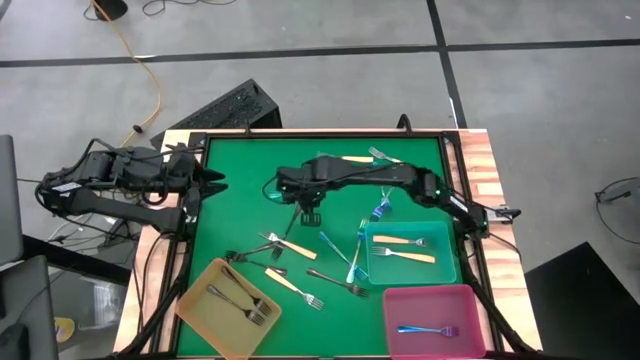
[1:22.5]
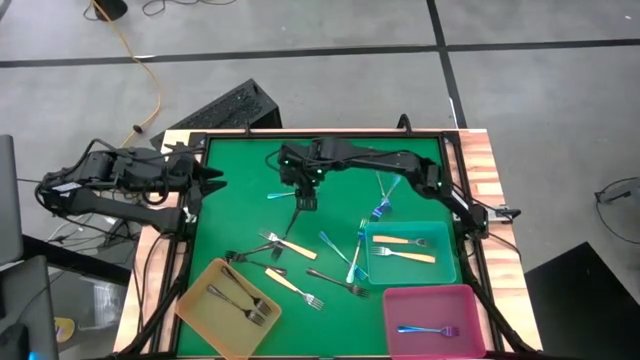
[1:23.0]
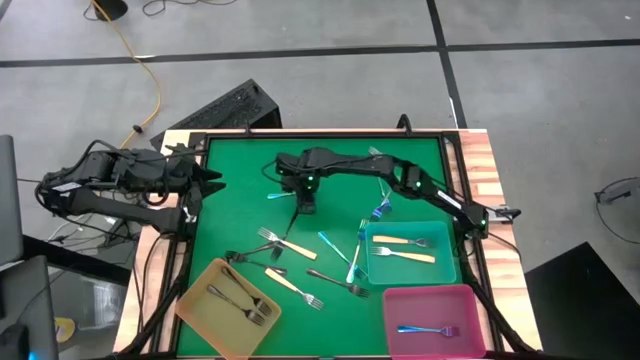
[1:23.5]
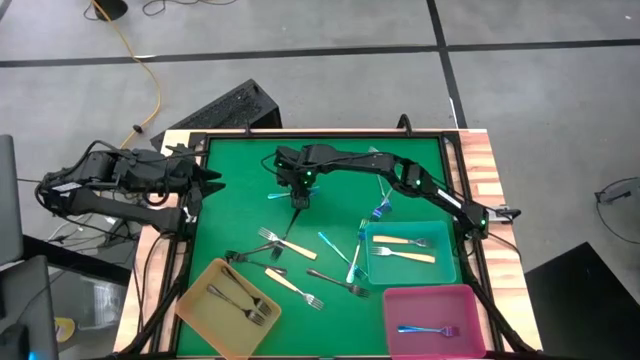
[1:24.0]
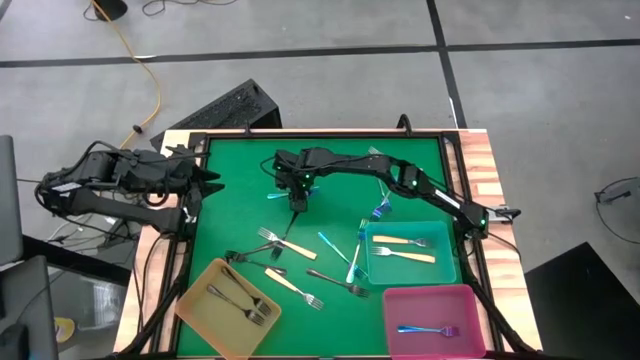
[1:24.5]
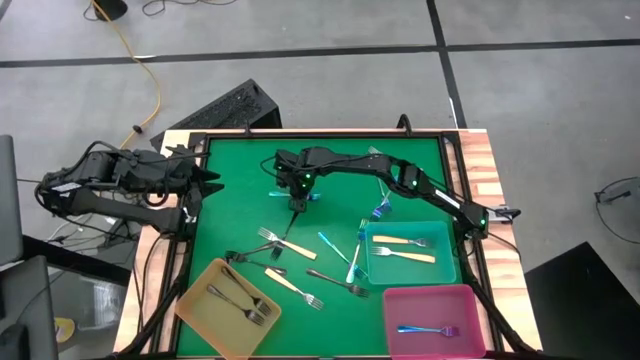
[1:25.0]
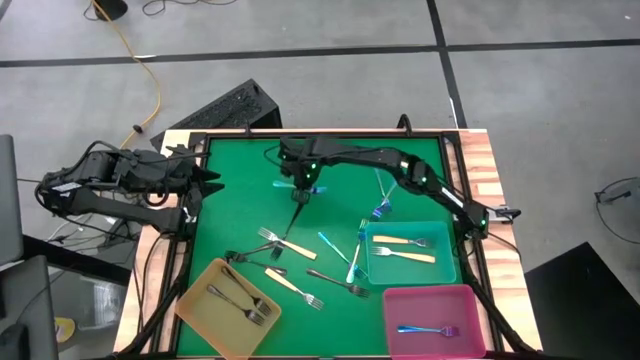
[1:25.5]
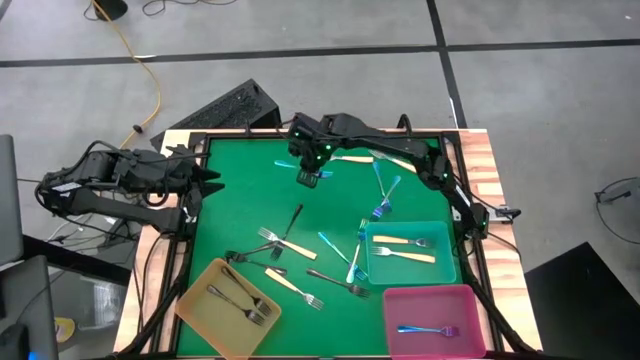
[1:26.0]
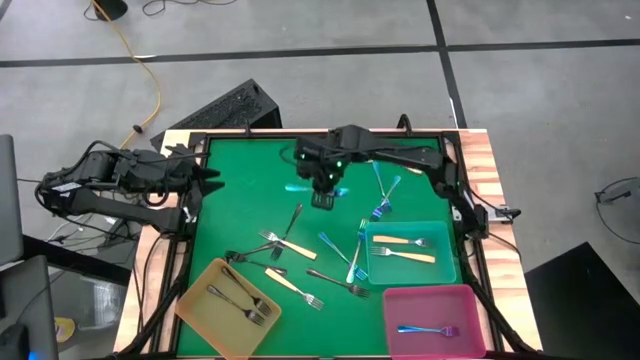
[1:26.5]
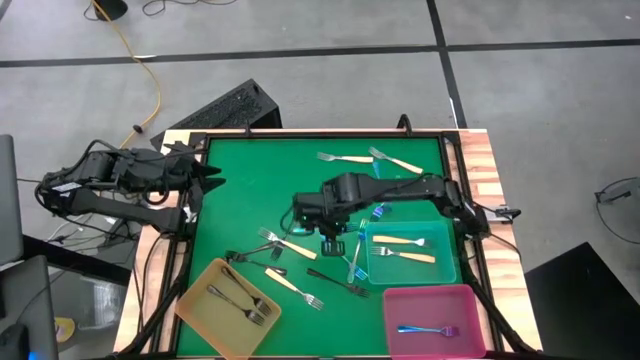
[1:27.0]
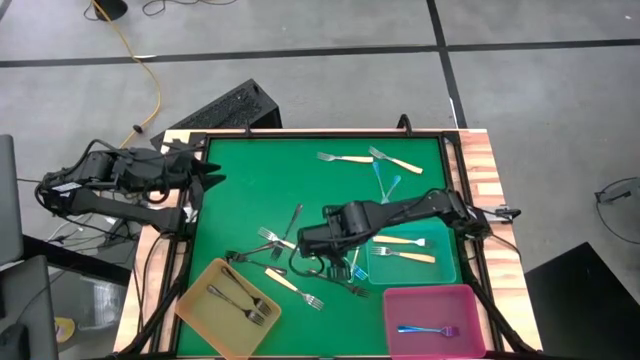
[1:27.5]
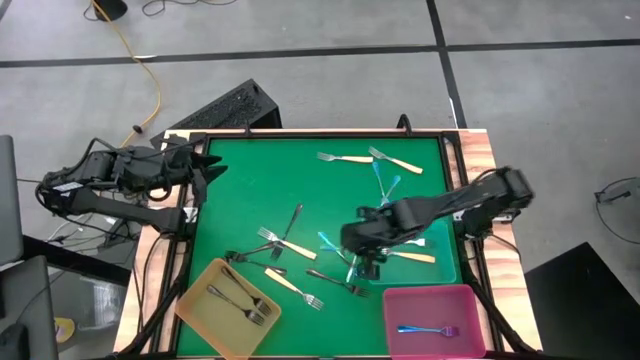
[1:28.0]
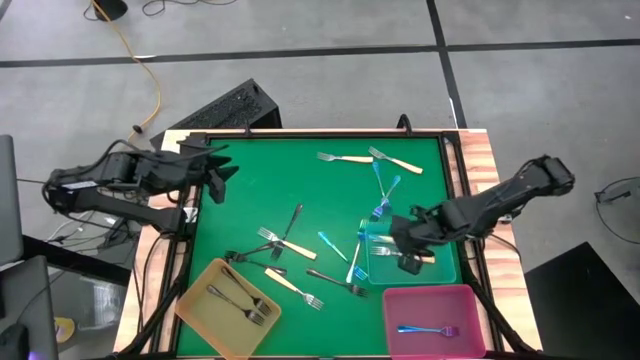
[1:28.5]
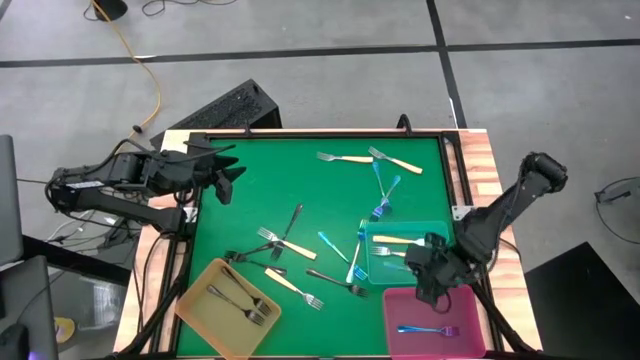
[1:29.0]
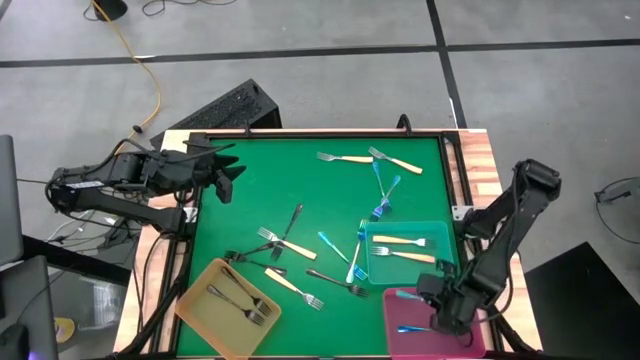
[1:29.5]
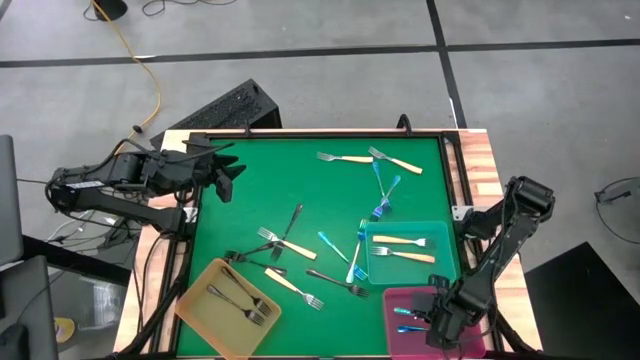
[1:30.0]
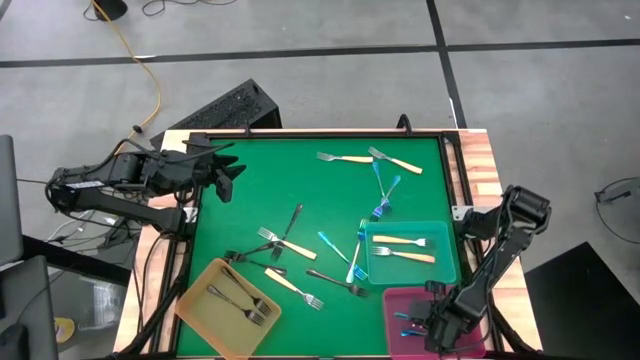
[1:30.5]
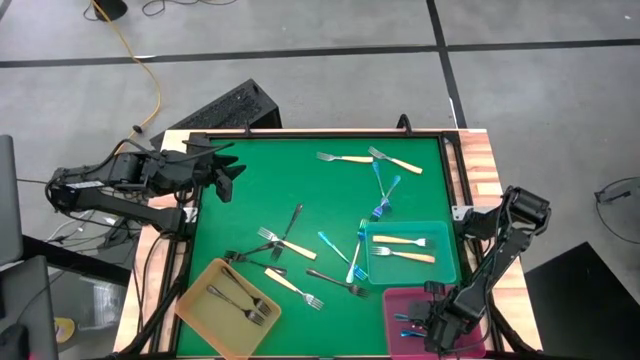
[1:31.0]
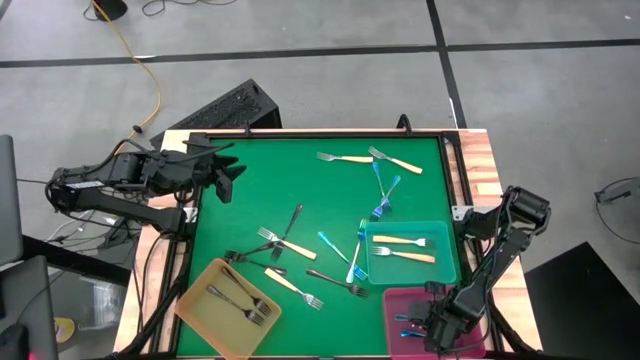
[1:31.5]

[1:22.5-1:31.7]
Task: Sort silverware by color (type)
Put the purple fork into the pink bin

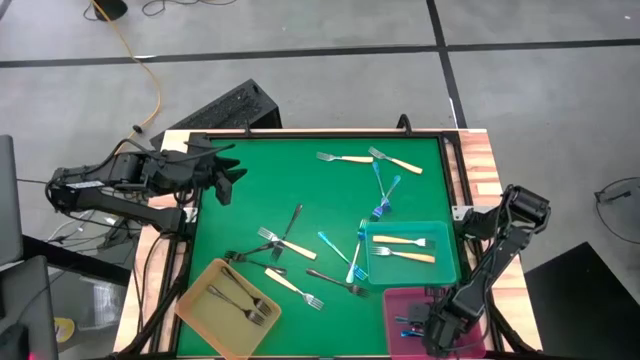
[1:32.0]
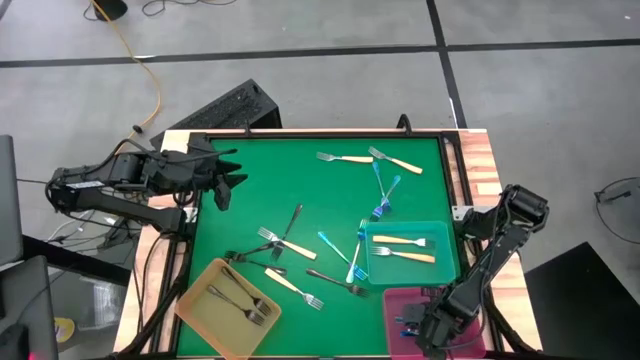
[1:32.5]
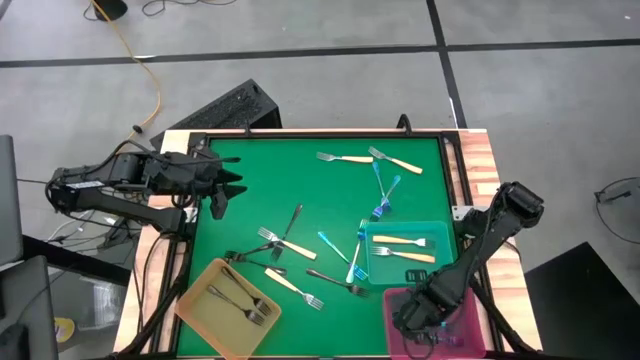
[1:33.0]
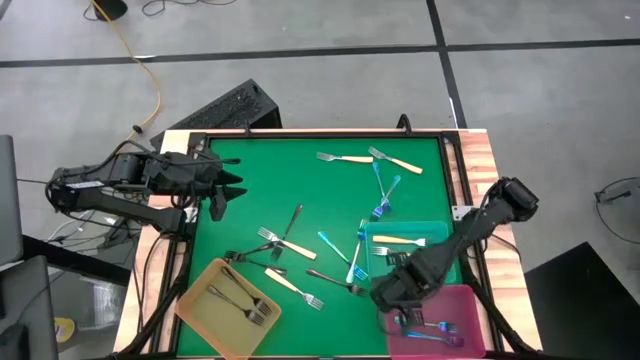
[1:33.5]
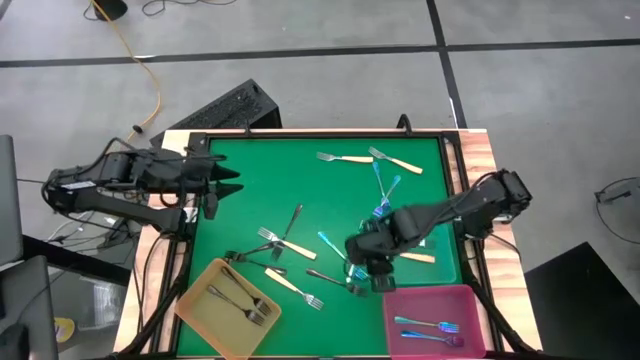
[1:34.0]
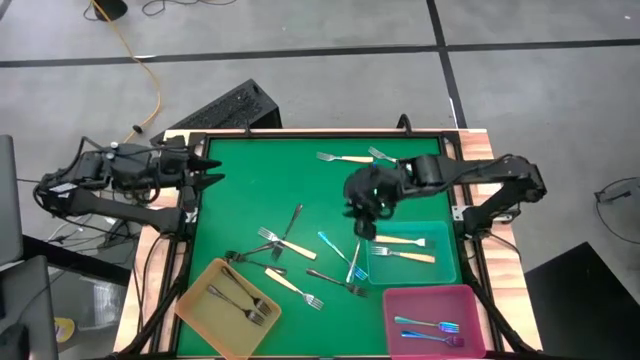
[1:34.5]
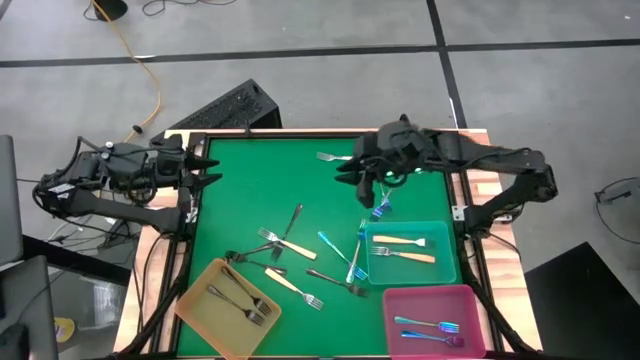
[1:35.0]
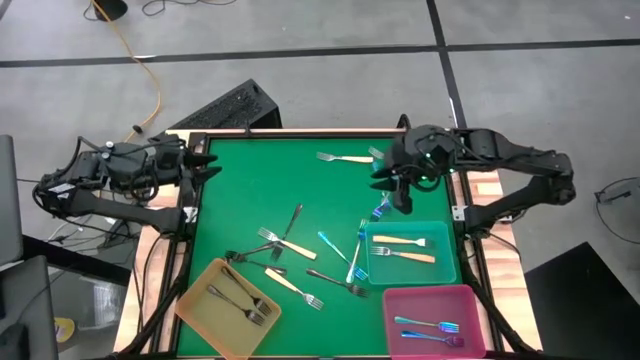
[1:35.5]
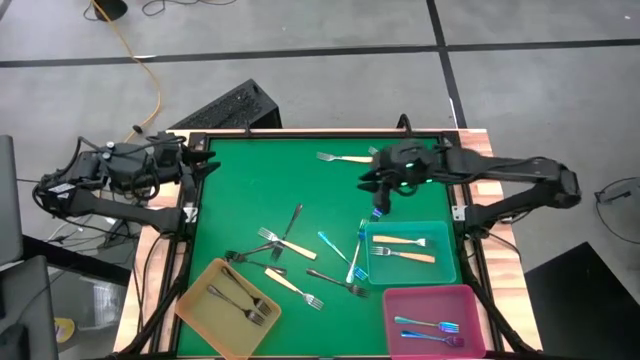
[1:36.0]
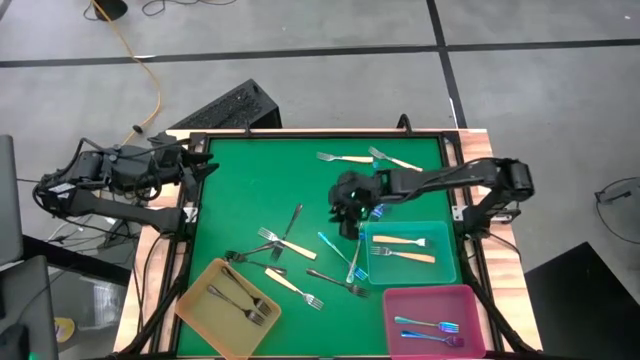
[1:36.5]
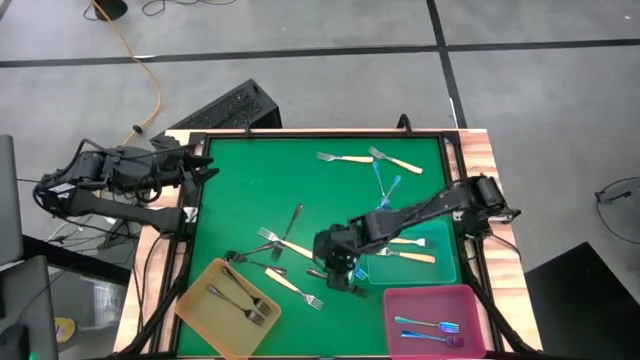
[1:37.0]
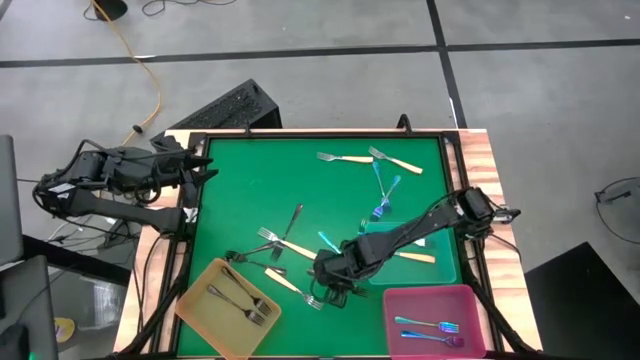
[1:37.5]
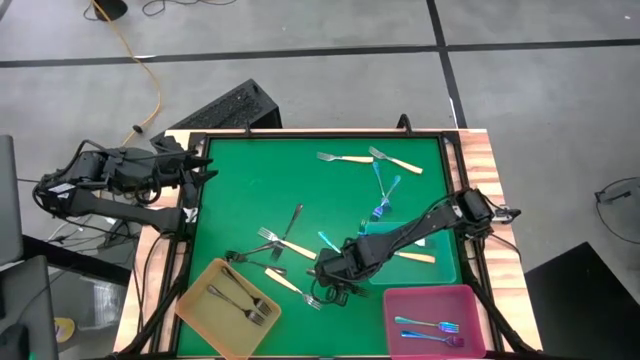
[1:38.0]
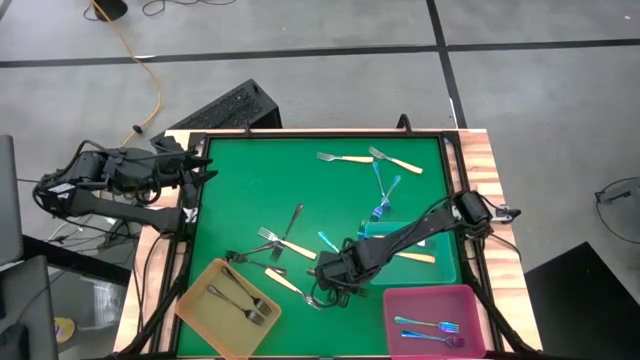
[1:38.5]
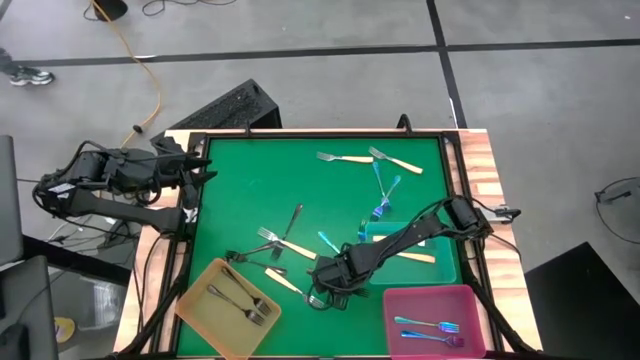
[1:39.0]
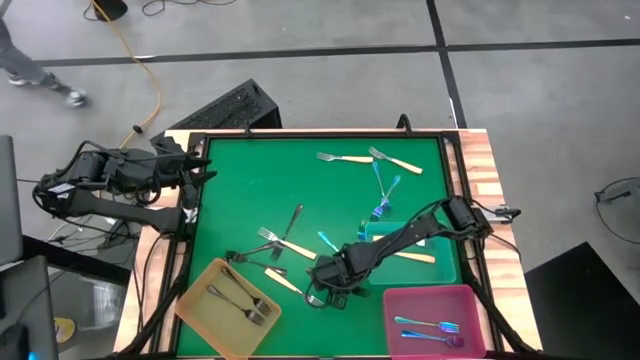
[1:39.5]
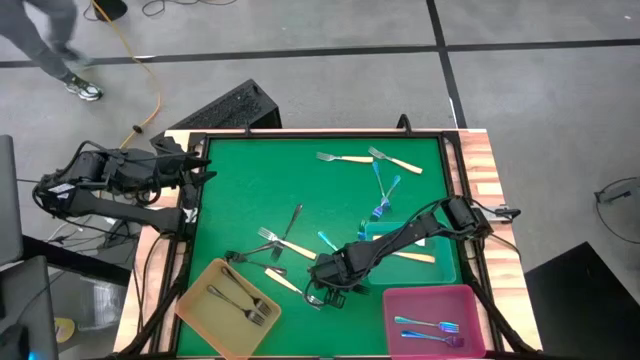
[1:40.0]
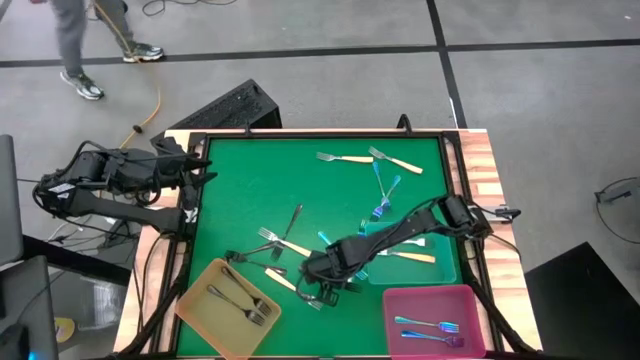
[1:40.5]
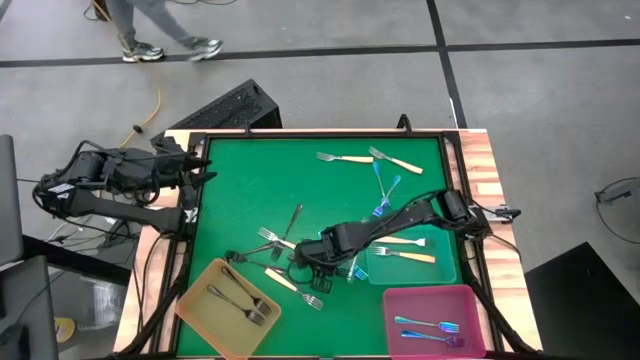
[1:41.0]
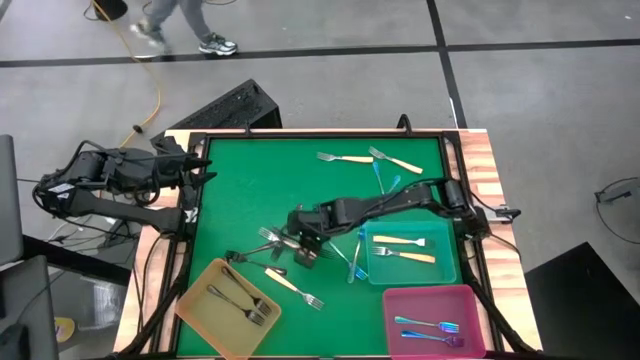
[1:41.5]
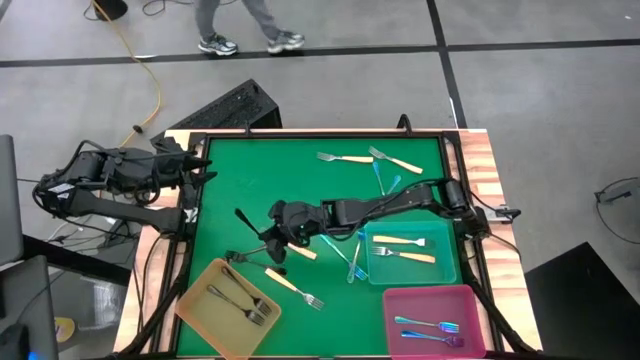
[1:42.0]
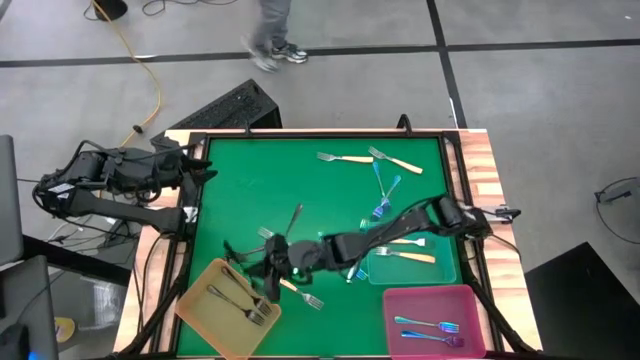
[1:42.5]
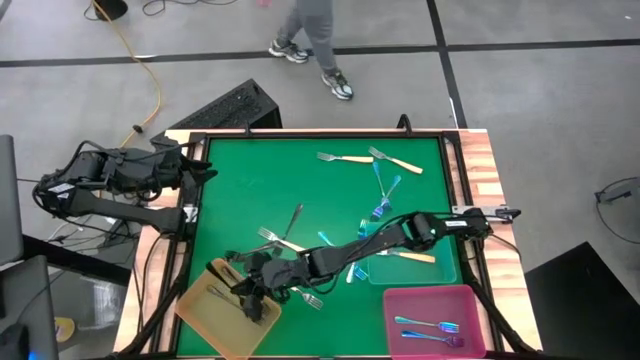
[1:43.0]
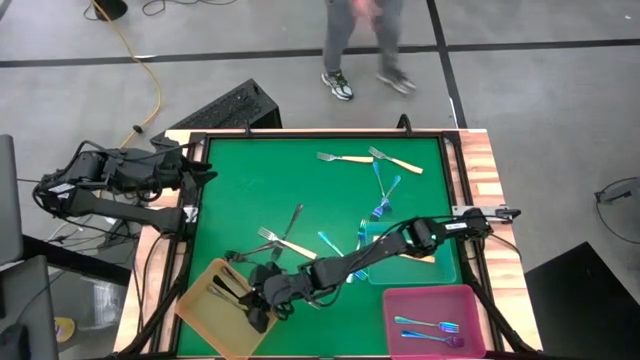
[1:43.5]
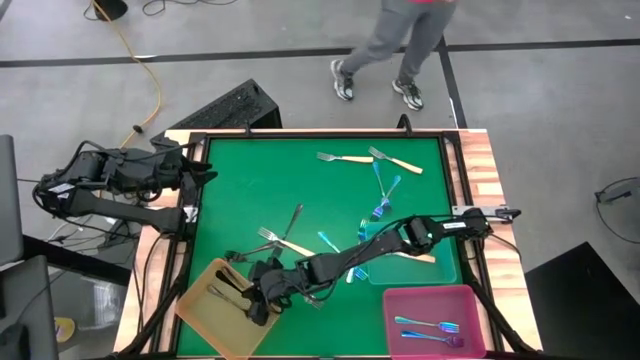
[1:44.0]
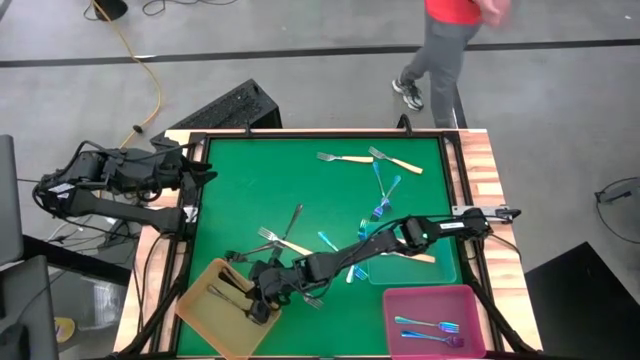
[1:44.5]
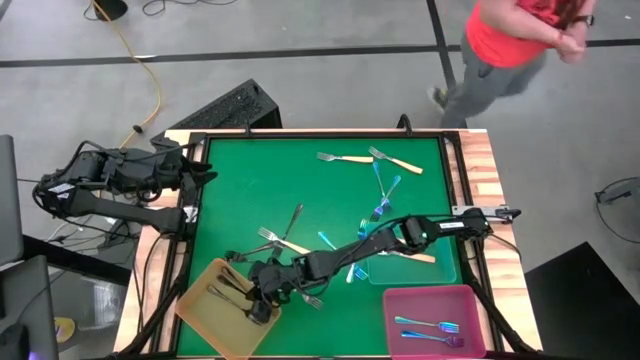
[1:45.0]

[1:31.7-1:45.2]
Put the black fork into the orange bin
